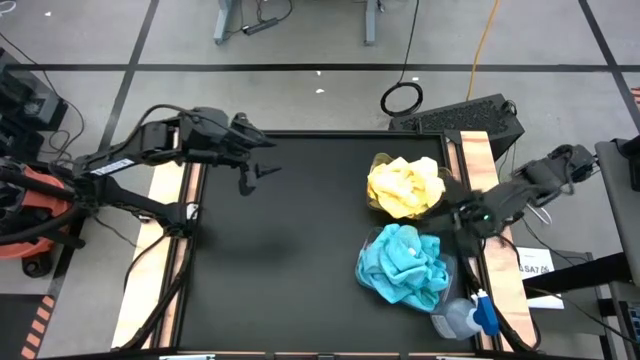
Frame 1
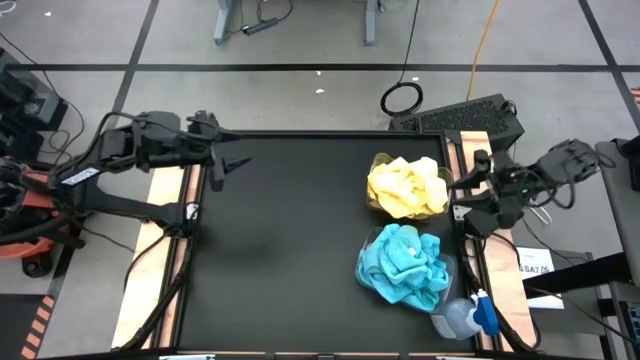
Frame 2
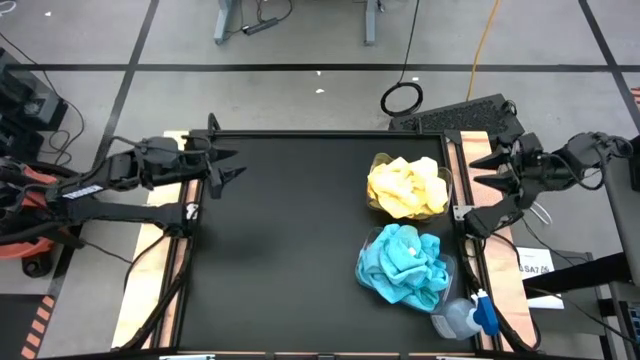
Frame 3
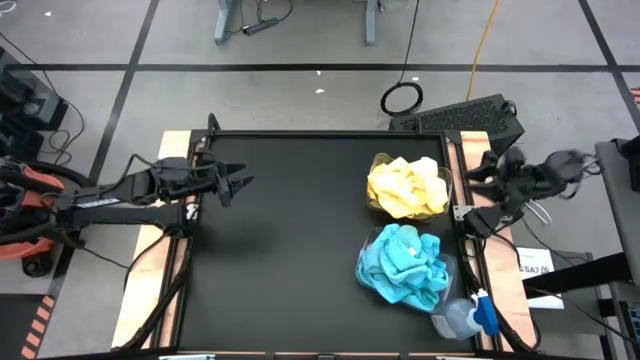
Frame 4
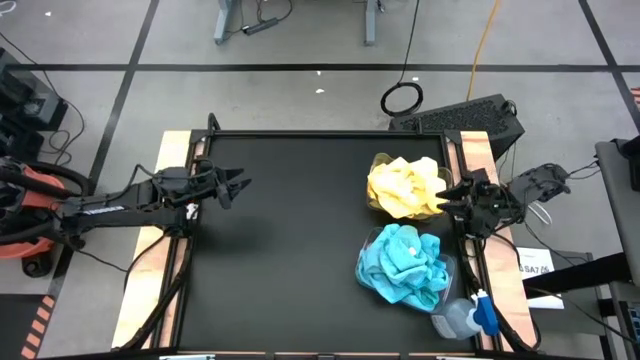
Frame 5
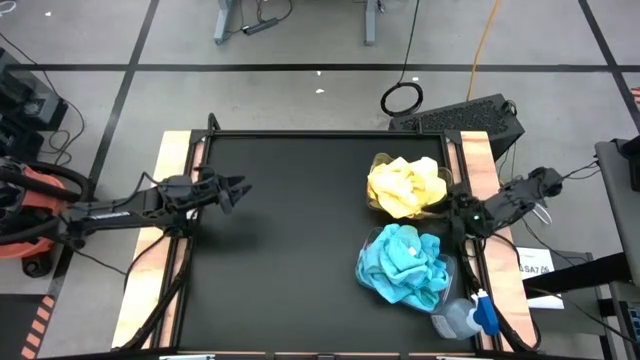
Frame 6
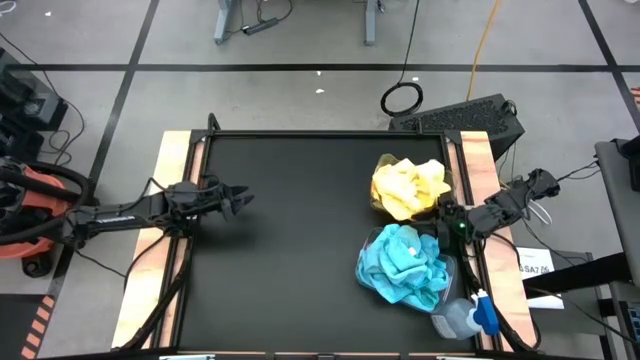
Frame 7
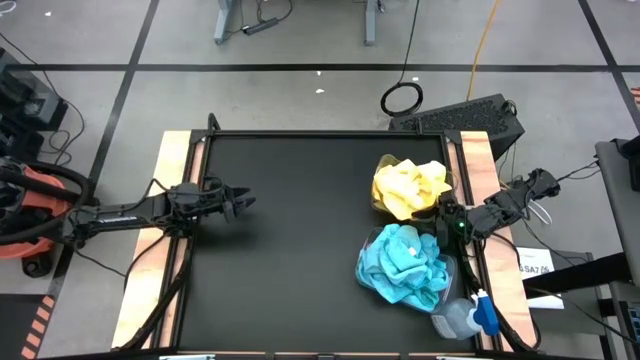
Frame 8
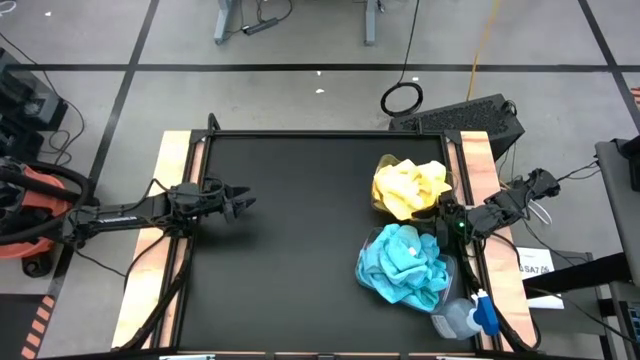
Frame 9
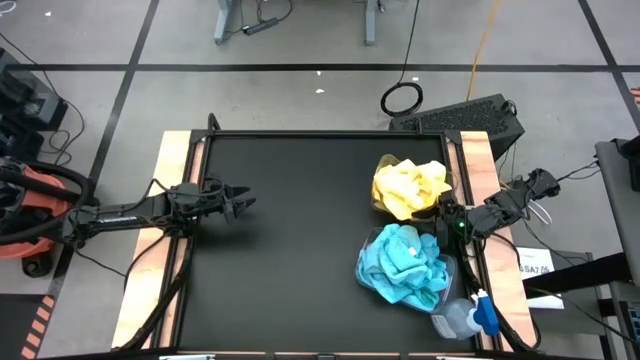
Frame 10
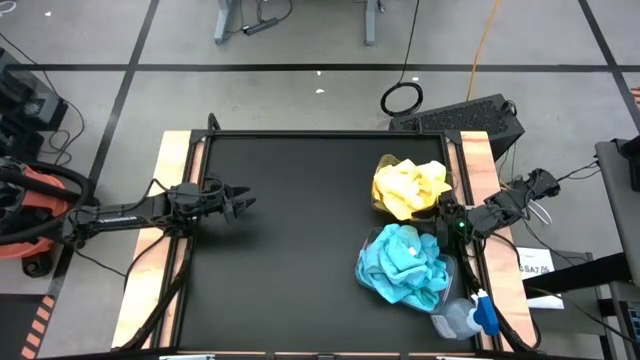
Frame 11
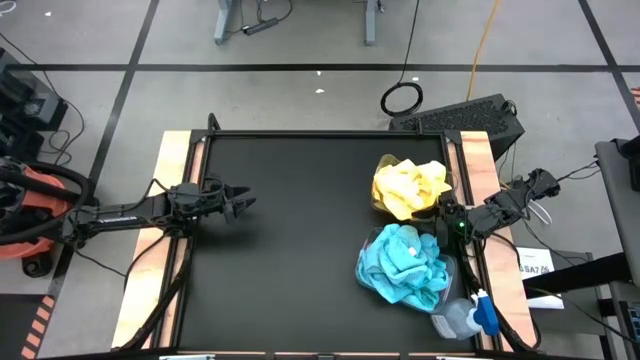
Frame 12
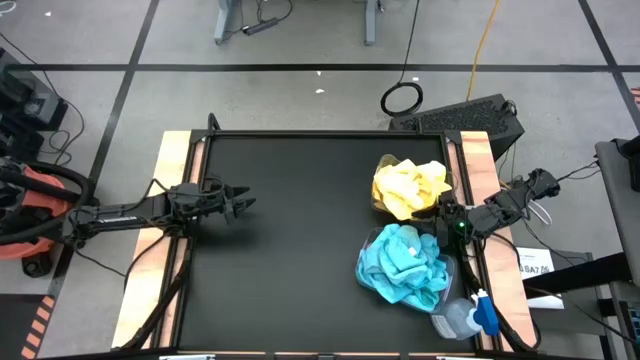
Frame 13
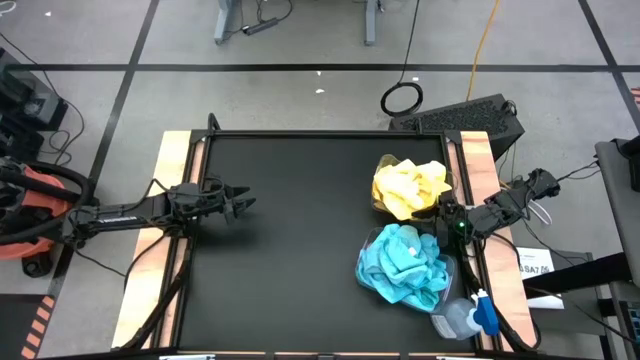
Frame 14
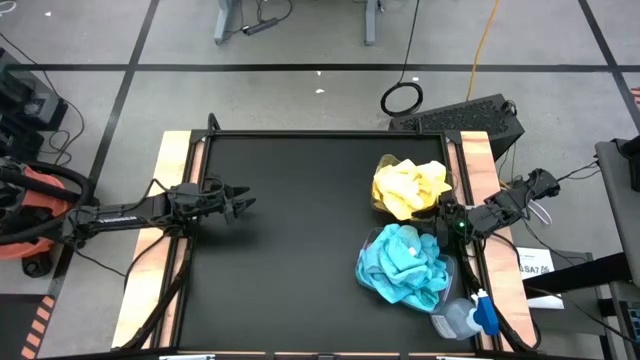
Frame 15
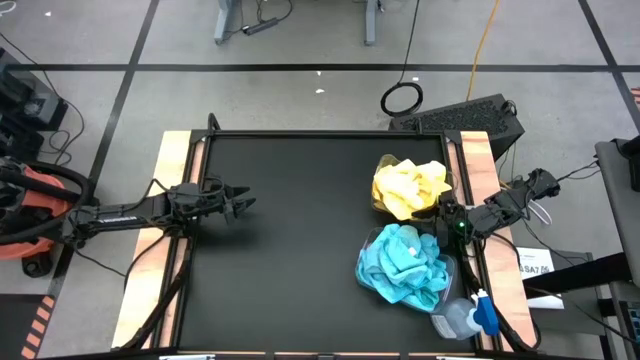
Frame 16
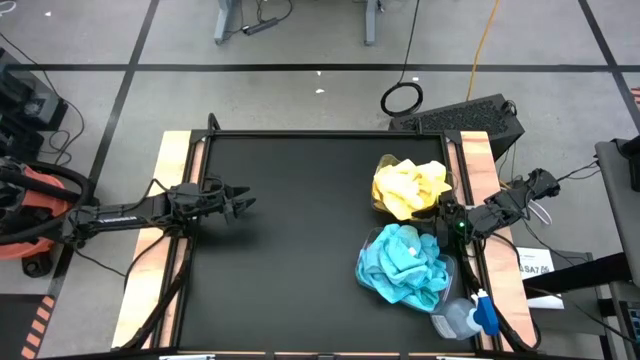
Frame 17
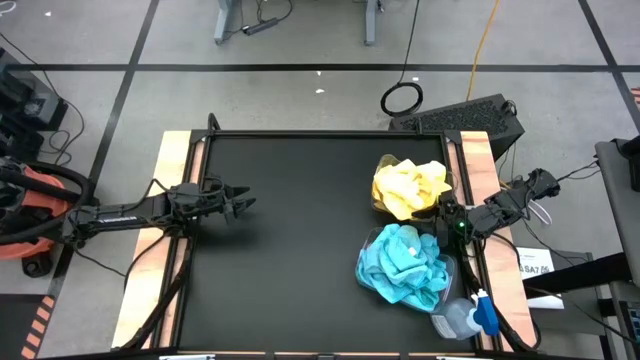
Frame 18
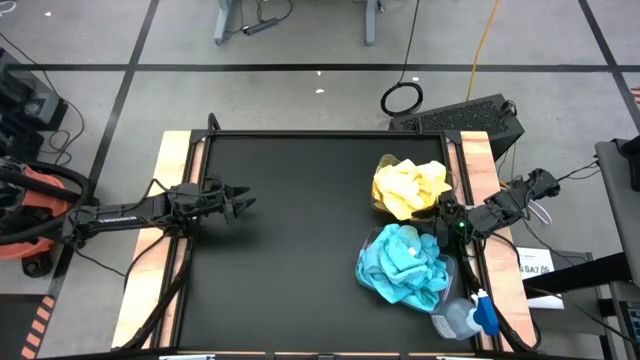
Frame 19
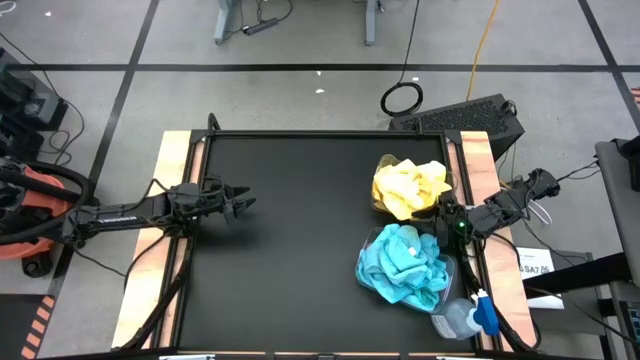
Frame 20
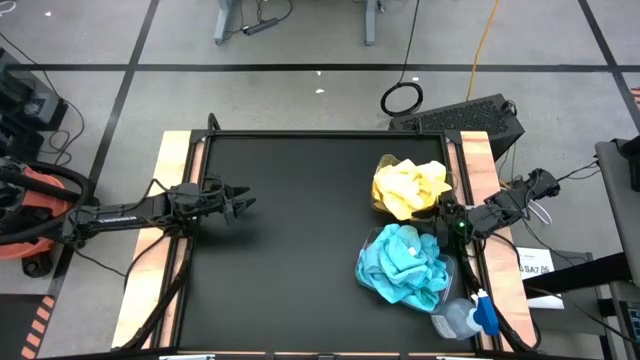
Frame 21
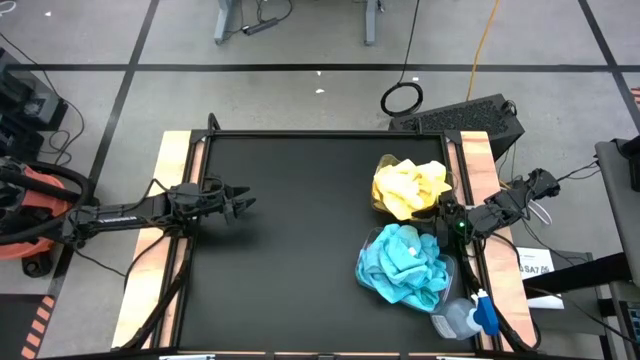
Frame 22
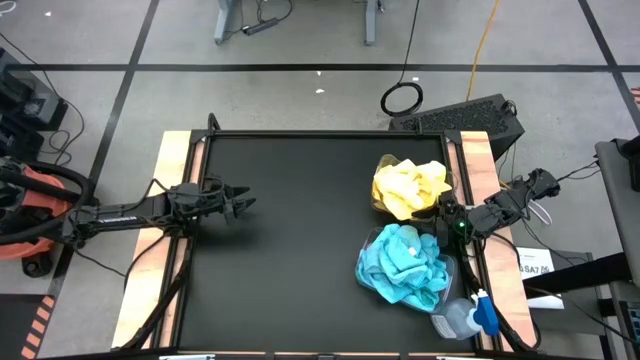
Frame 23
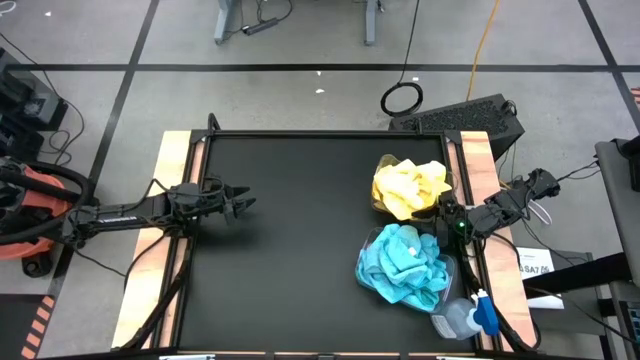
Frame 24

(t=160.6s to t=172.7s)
Task: Sort microfiber towel by color & place in baskets
Return to Home Position

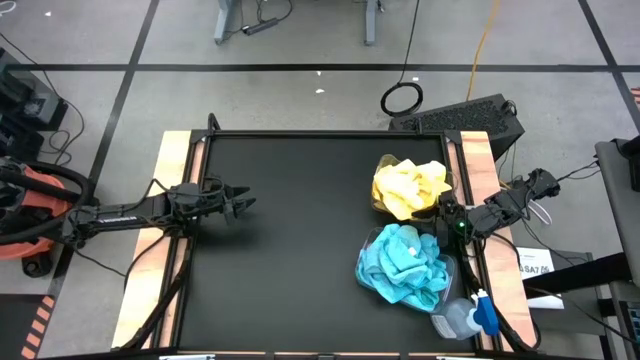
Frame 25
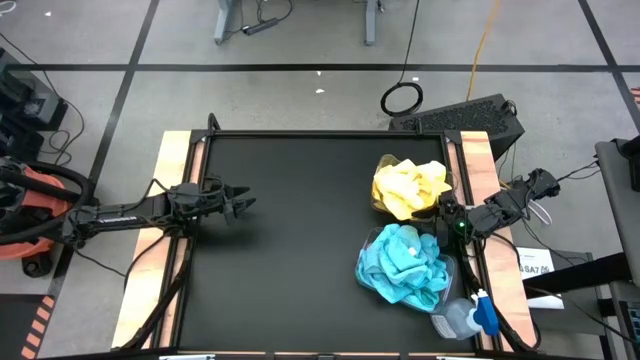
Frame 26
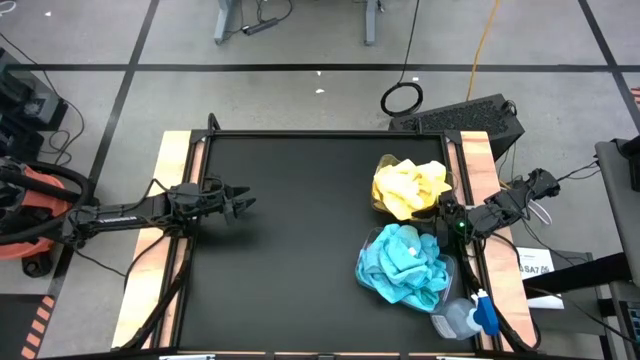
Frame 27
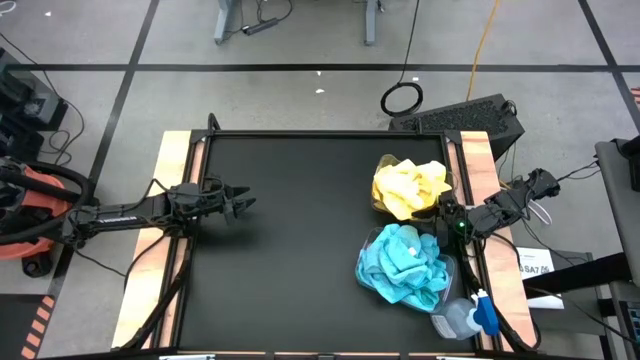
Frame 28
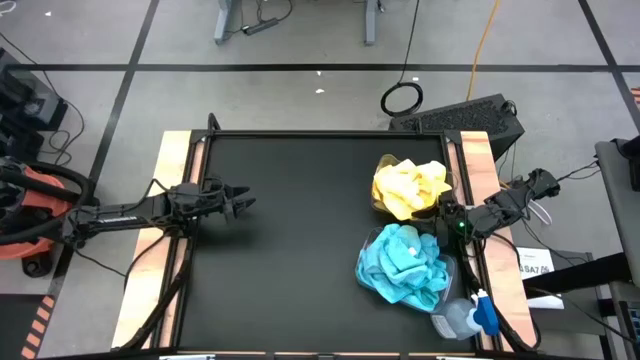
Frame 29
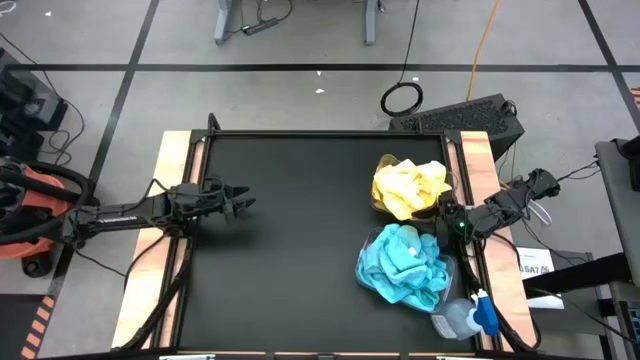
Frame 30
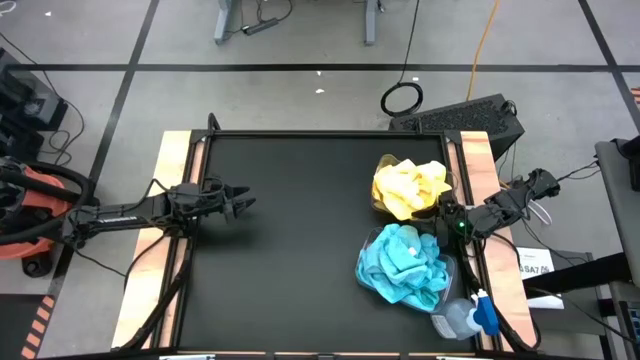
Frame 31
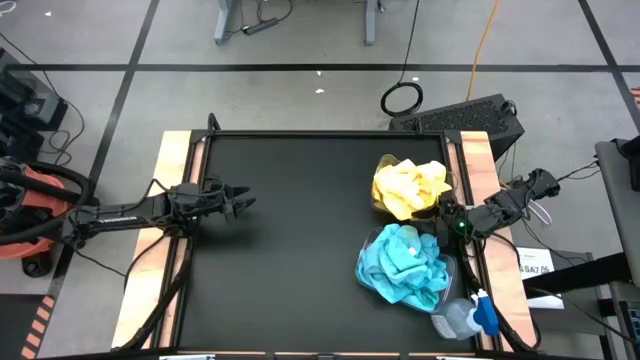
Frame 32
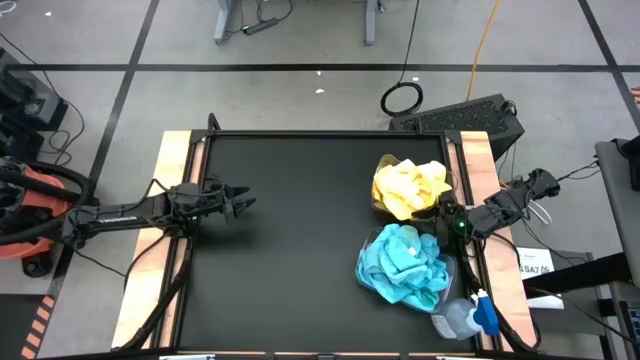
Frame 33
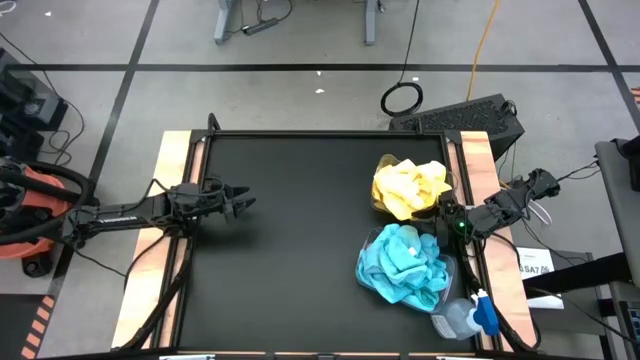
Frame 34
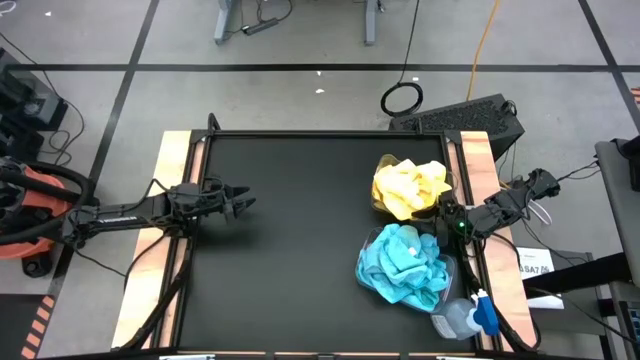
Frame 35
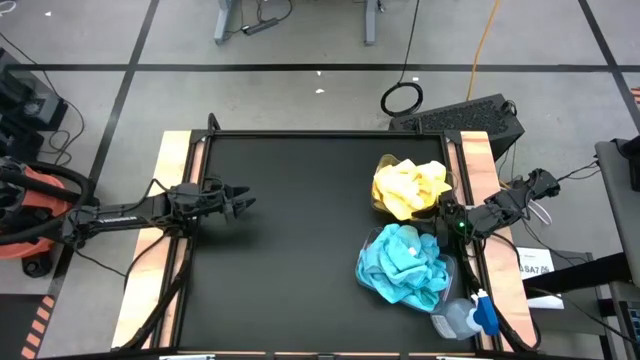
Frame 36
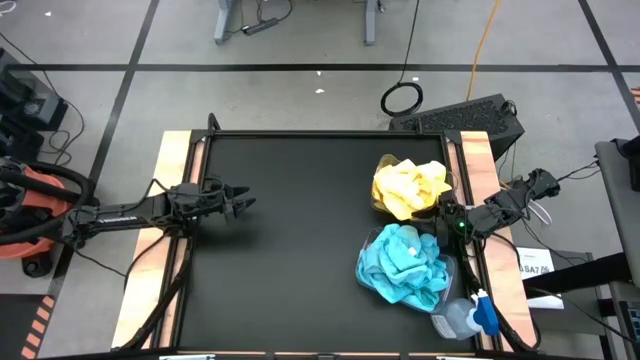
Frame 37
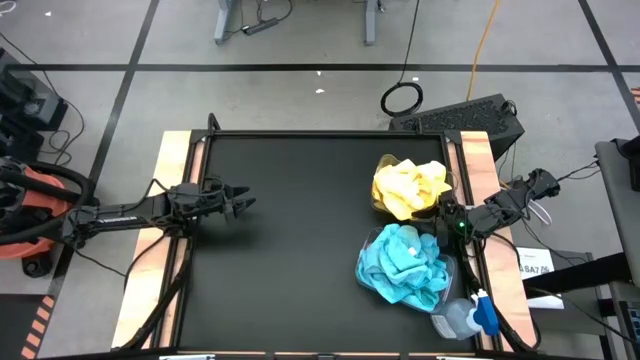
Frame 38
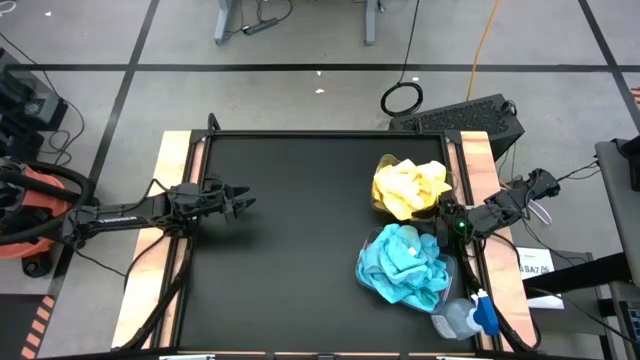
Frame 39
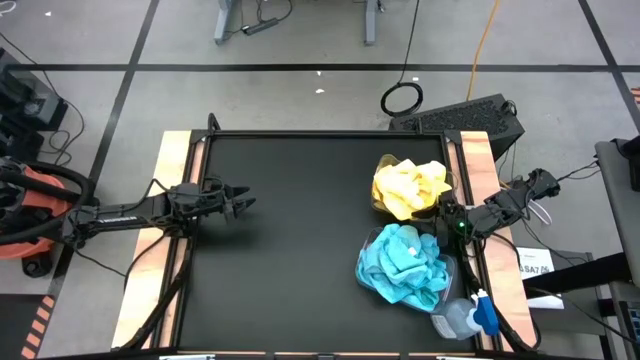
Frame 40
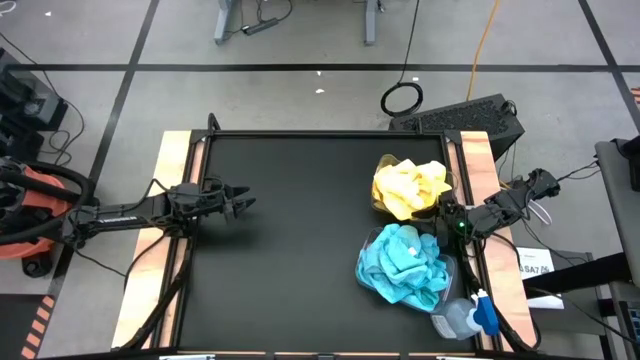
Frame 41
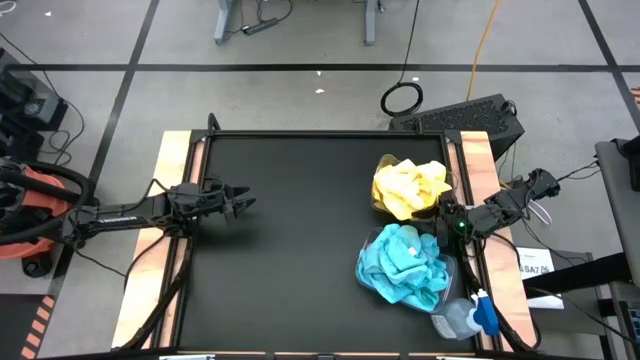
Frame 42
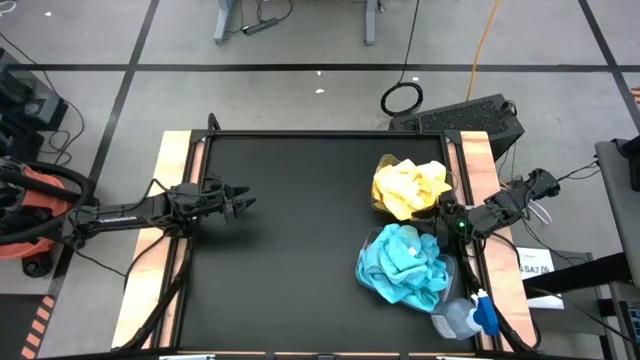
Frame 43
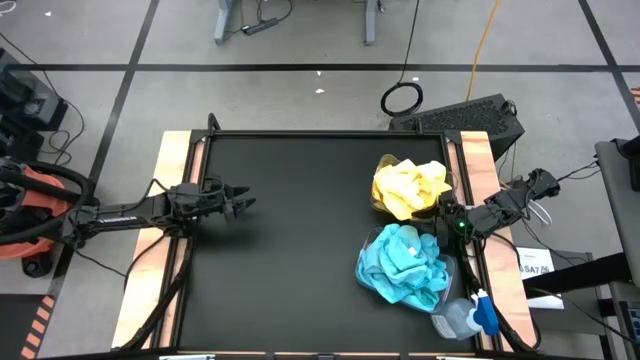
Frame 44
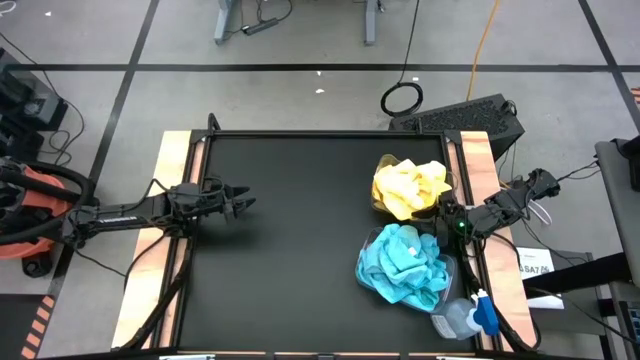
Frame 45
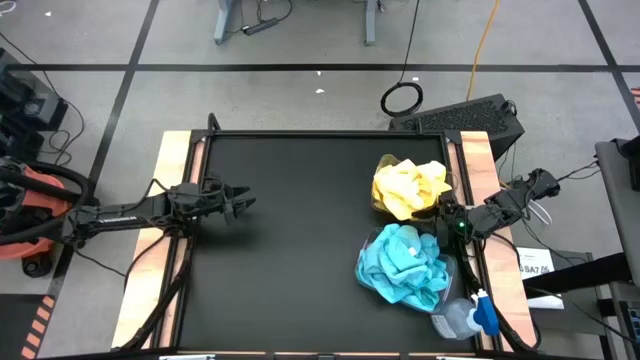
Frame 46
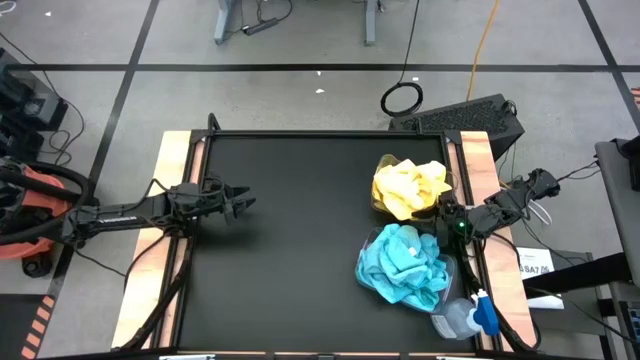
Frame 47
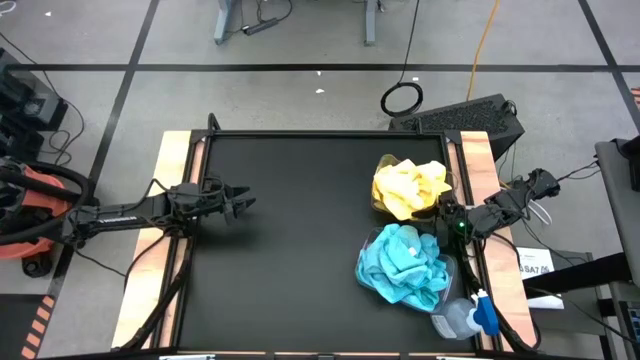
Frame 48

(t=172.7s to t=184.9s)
Return to Home Position
